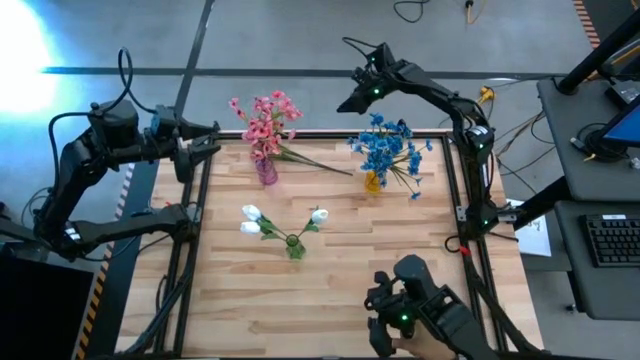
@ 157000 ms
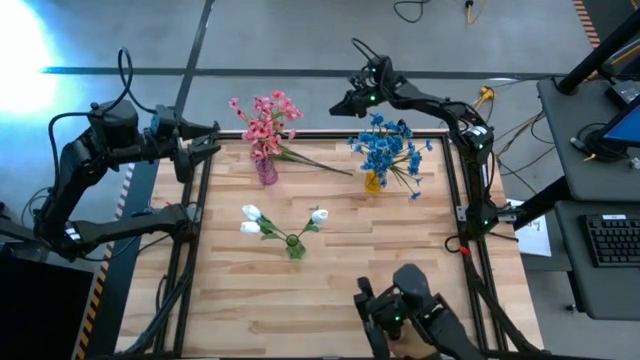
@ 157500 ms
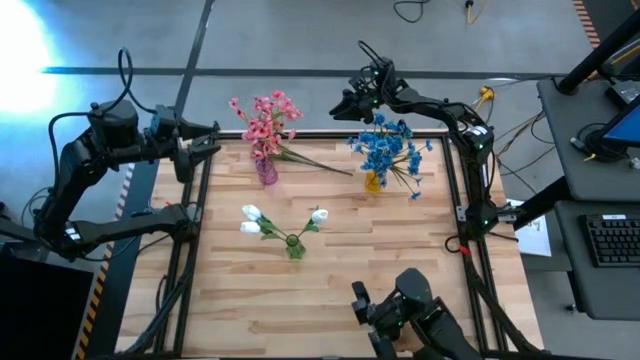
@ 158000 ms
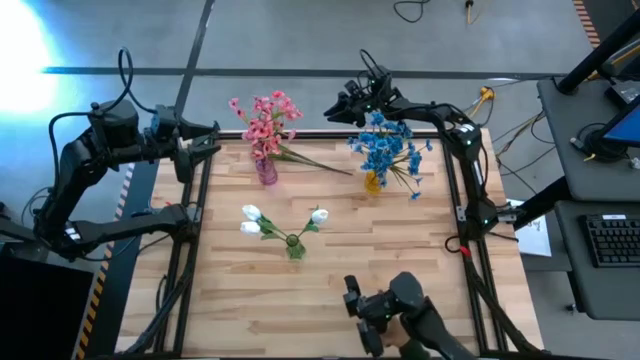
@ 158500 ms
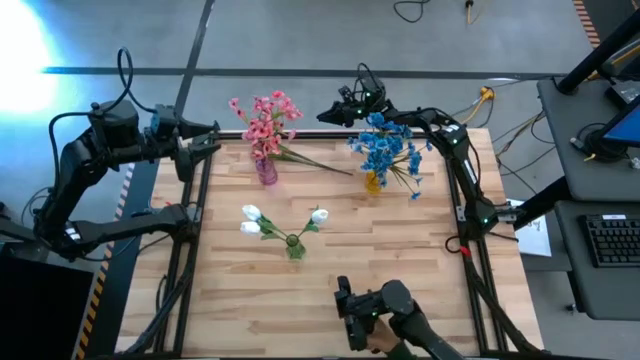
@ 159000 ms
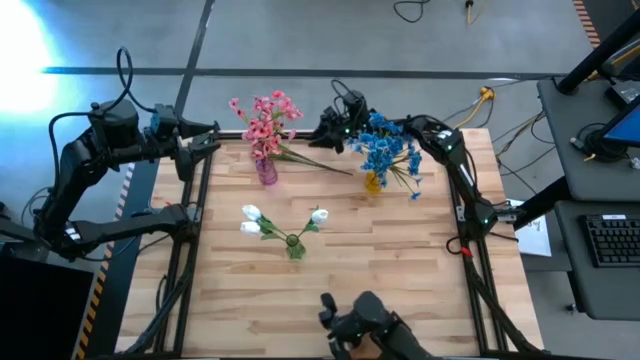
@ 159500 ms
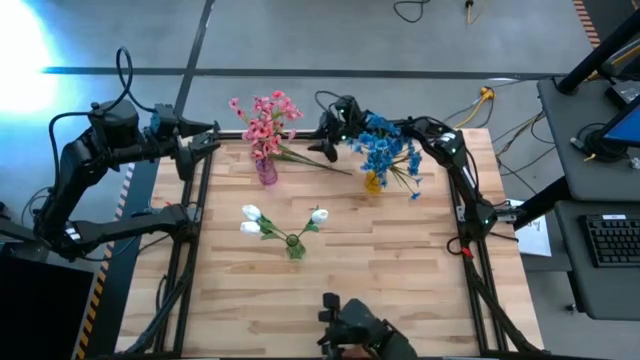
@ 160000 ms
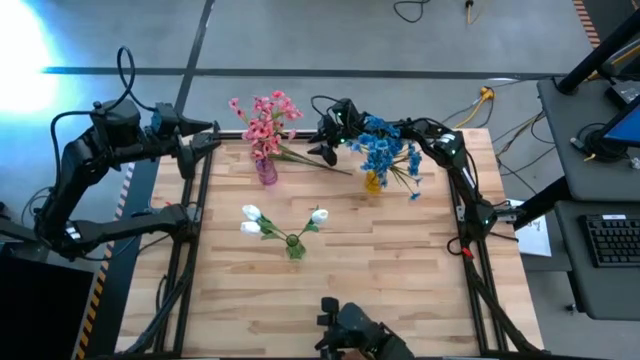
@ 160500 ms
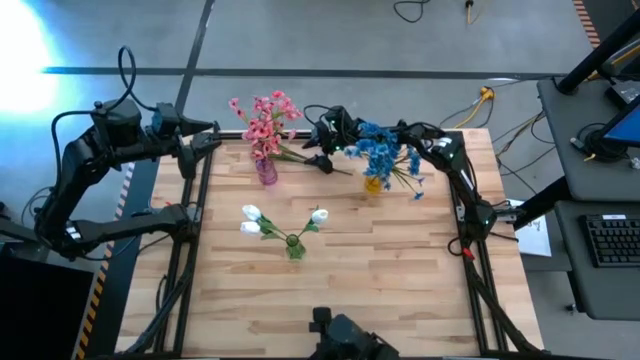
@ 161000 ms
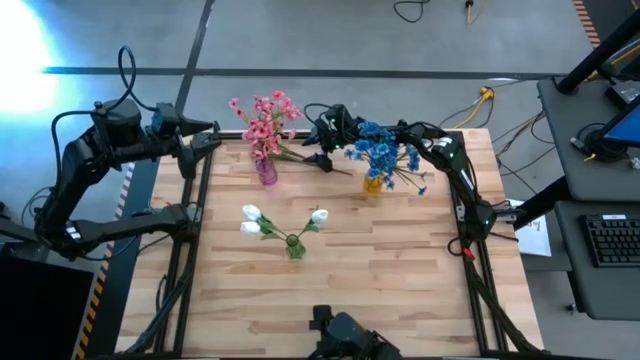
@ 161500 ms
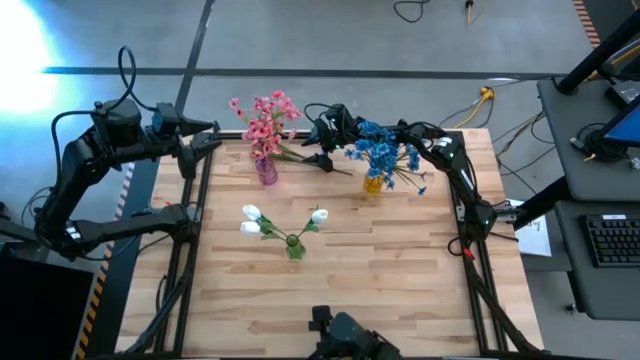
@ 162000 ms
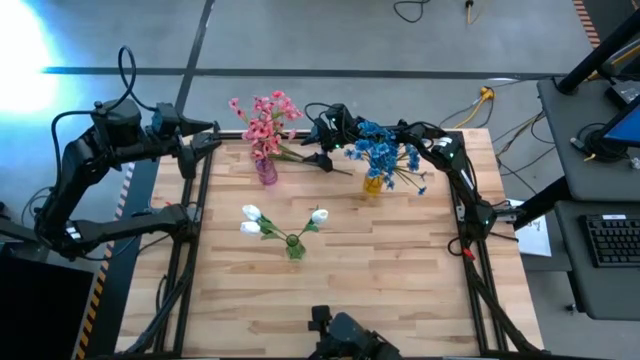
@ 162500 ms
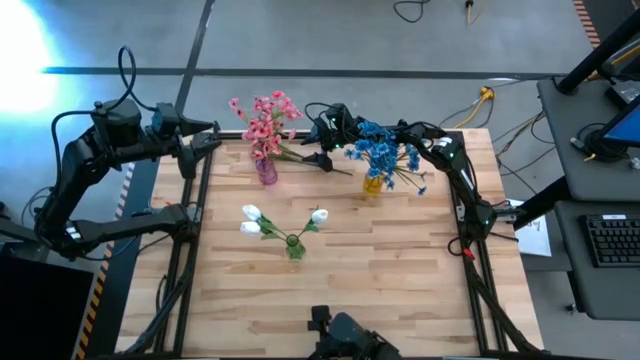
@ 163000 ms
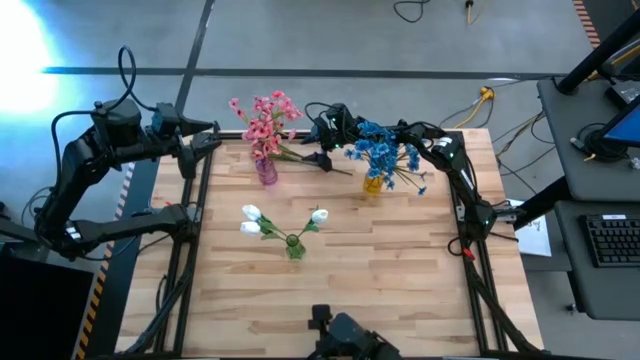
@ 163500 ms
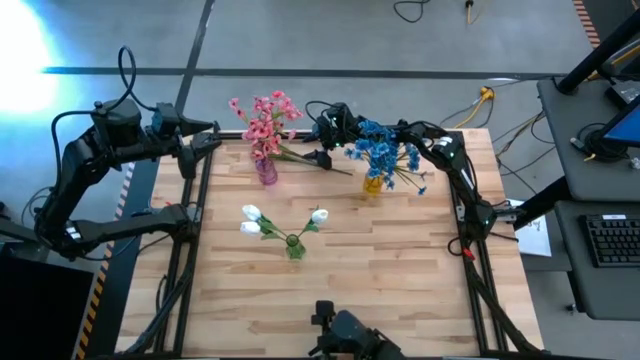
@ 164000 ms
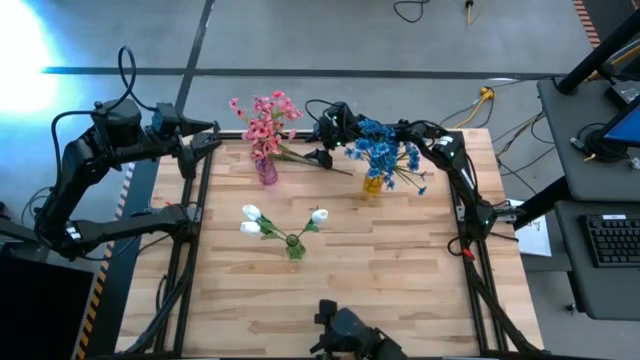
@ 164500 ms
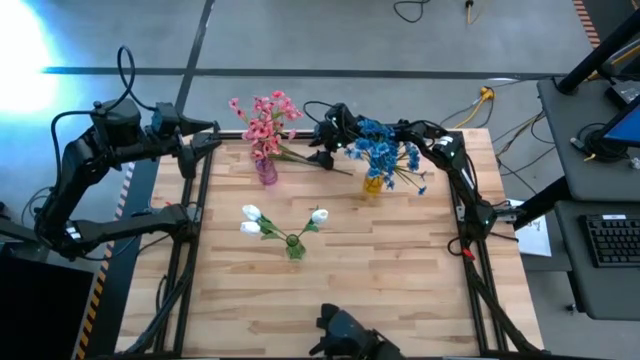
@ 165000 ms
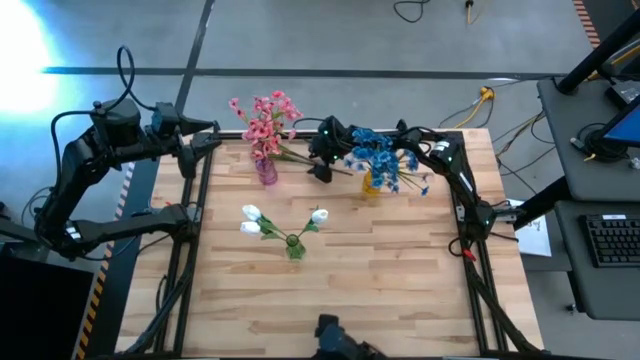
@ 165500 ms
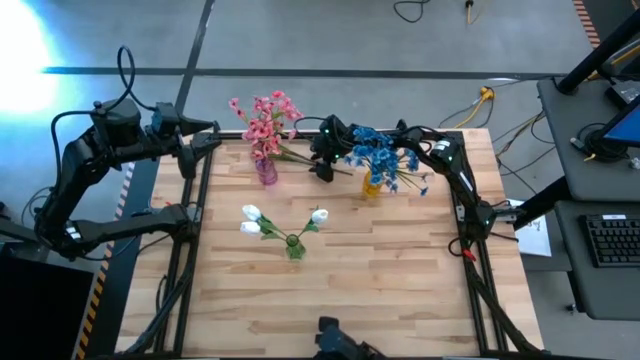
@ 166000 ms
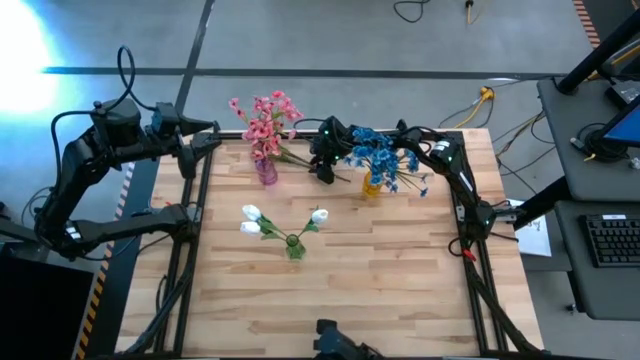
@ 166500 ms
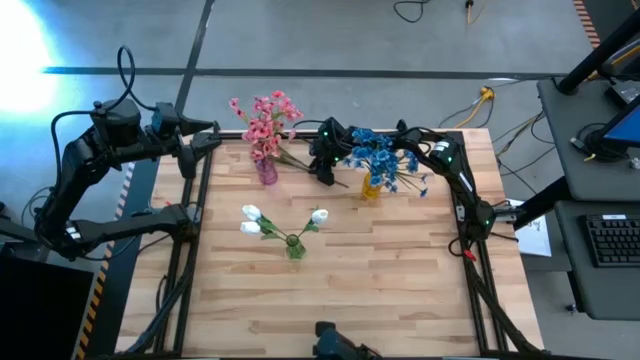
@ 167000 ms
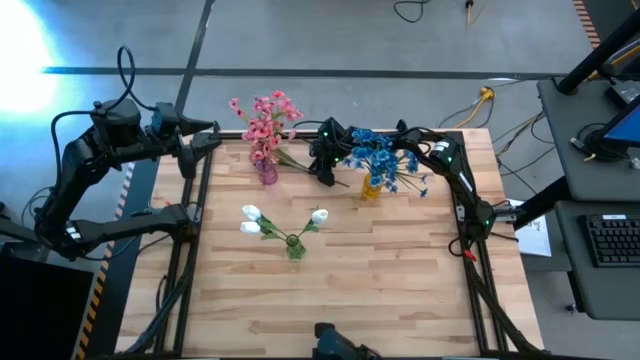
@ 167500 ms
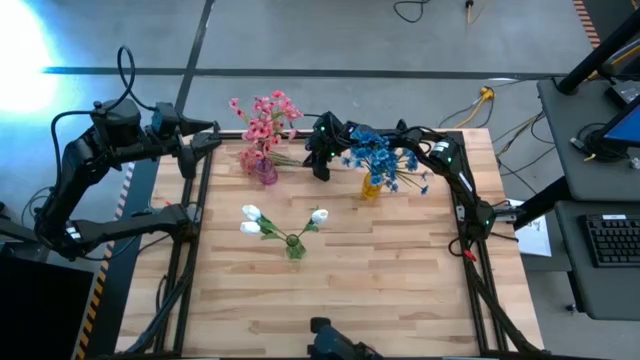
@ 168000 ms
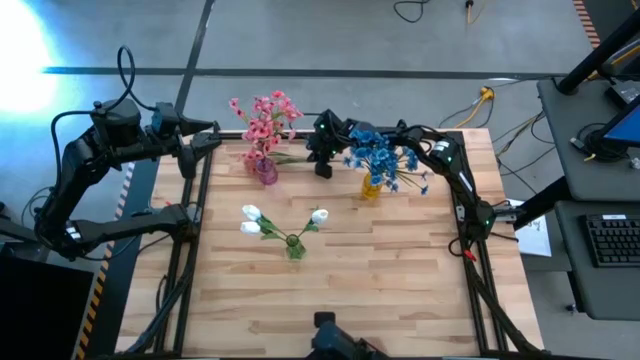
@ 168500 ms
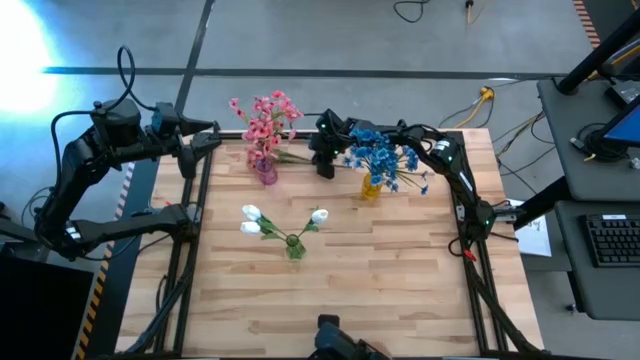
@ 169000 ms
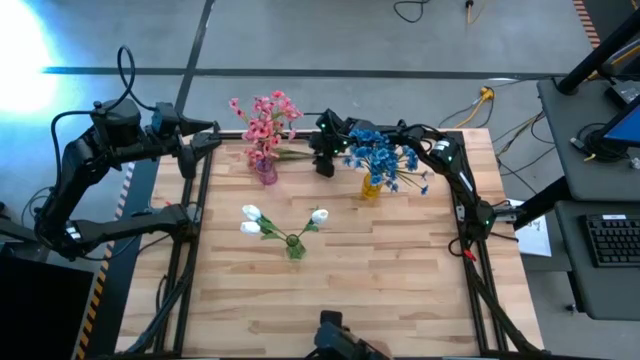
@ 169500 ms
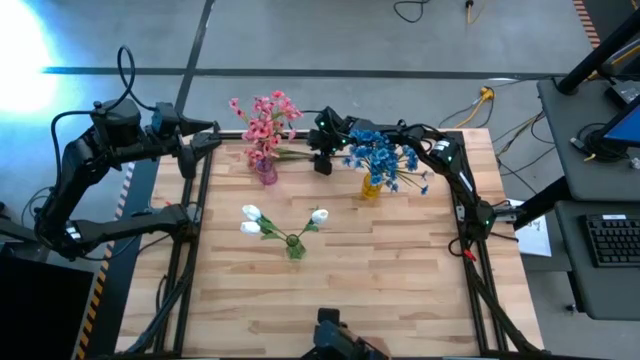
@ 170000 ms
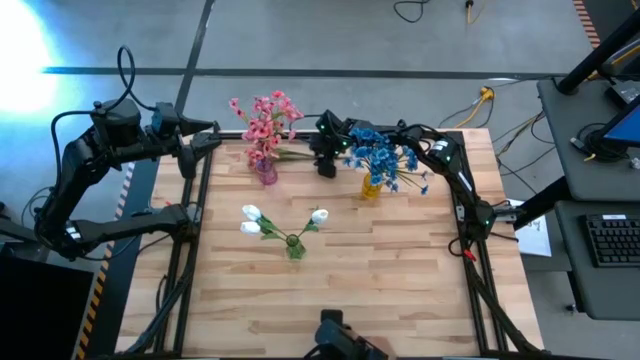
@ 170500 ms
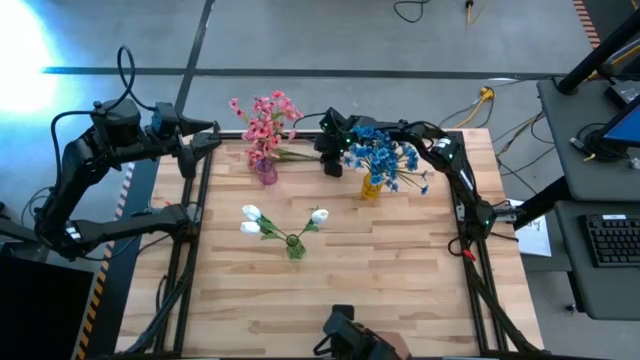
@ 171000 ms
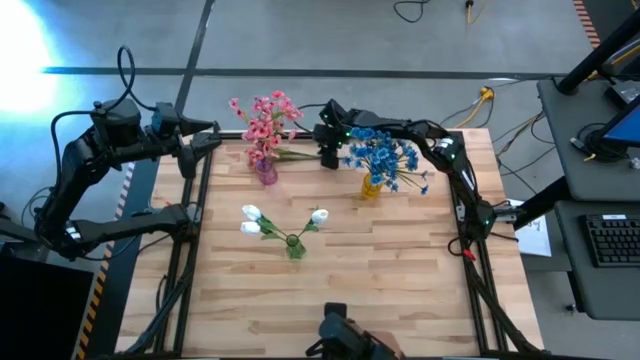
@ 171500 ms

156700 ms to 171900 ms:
Task: Sort flowers into vase by color
Put the pink flowers into the pink vase

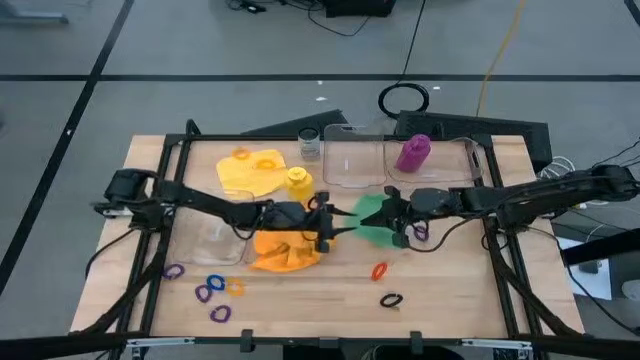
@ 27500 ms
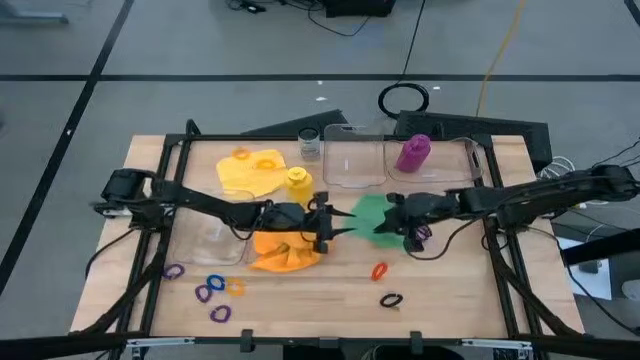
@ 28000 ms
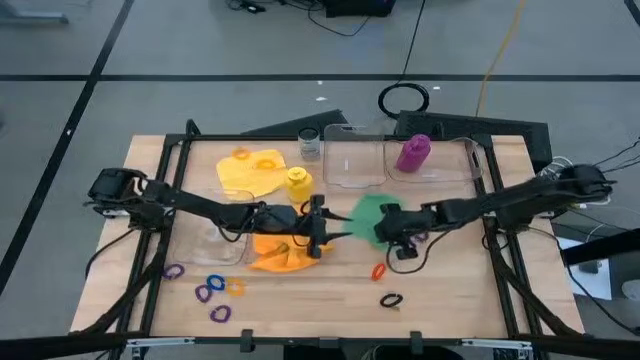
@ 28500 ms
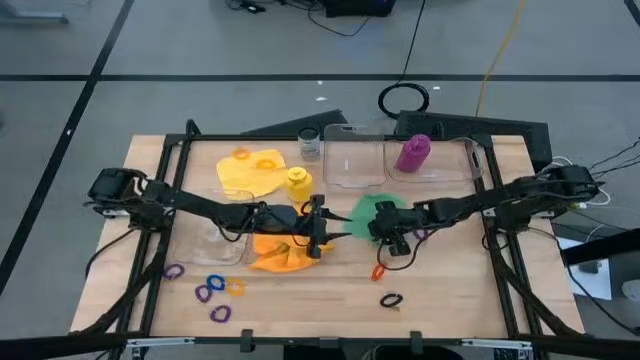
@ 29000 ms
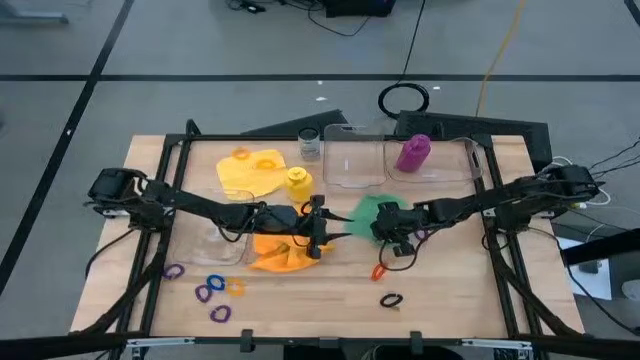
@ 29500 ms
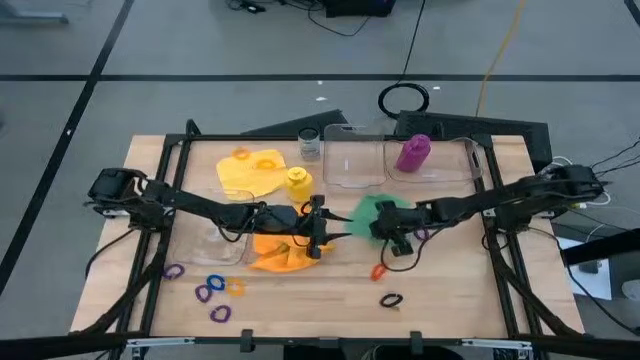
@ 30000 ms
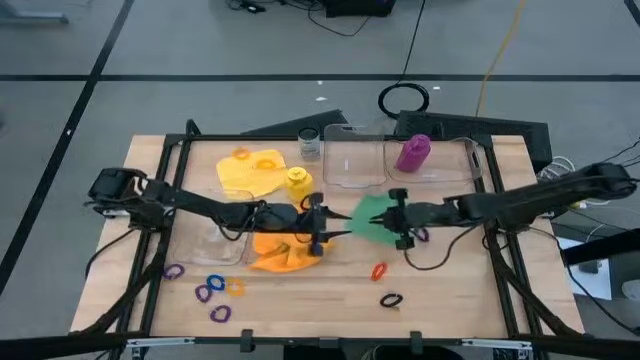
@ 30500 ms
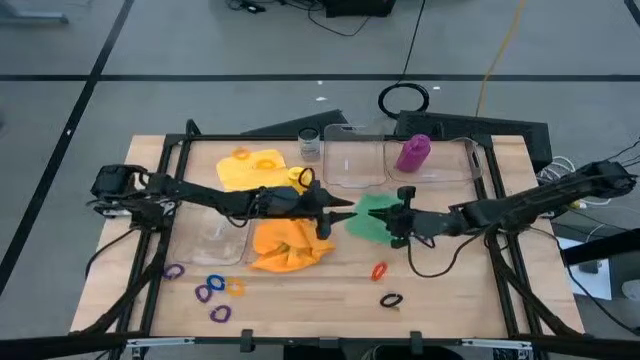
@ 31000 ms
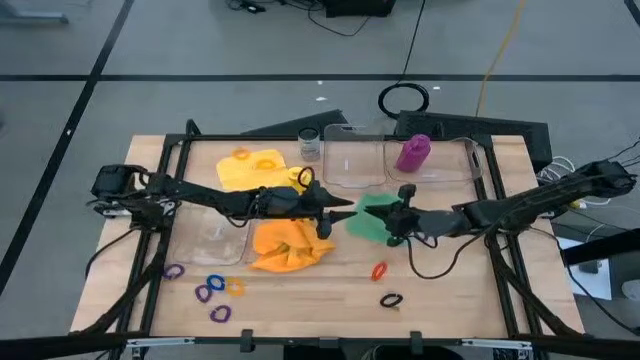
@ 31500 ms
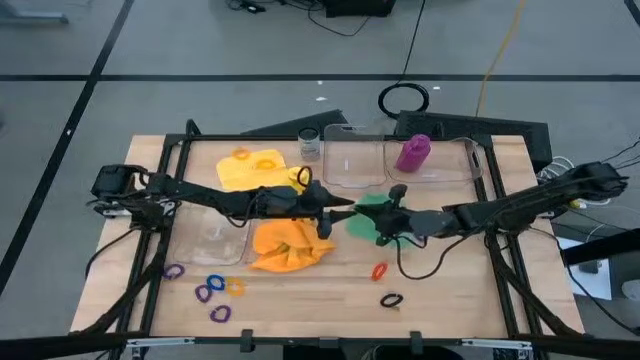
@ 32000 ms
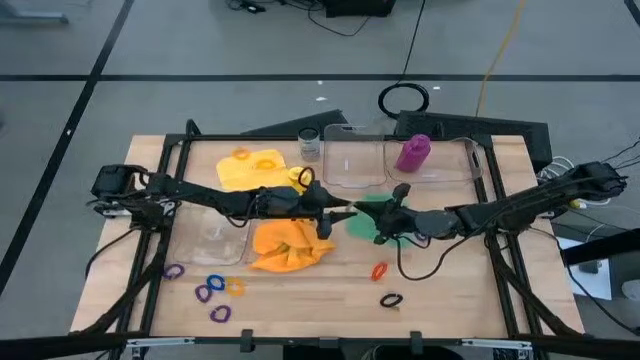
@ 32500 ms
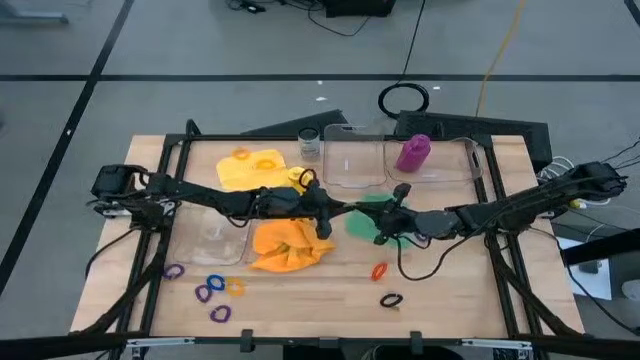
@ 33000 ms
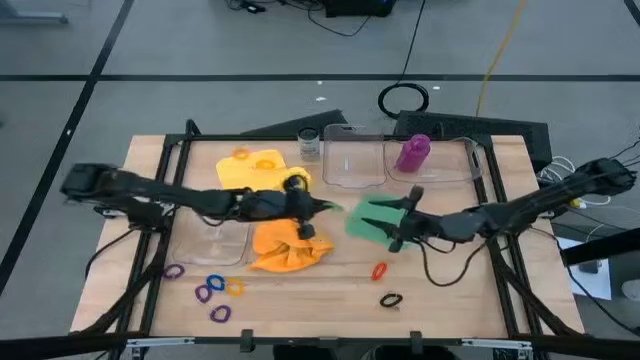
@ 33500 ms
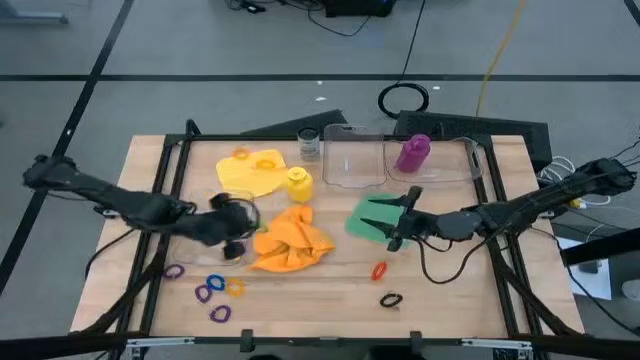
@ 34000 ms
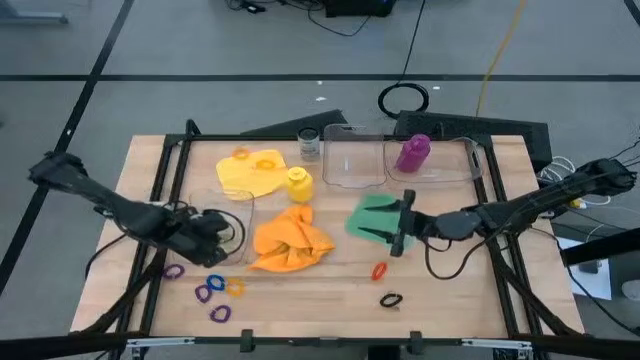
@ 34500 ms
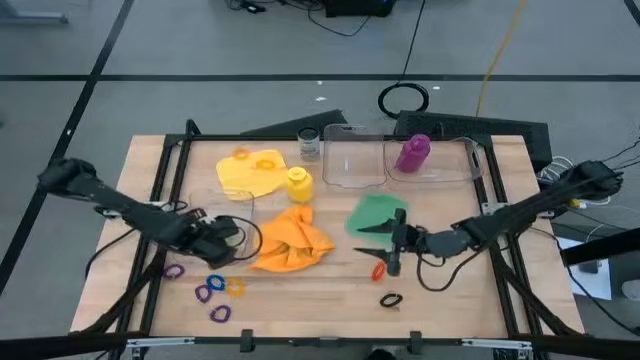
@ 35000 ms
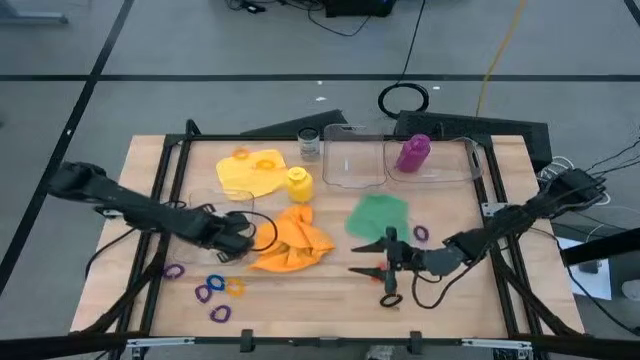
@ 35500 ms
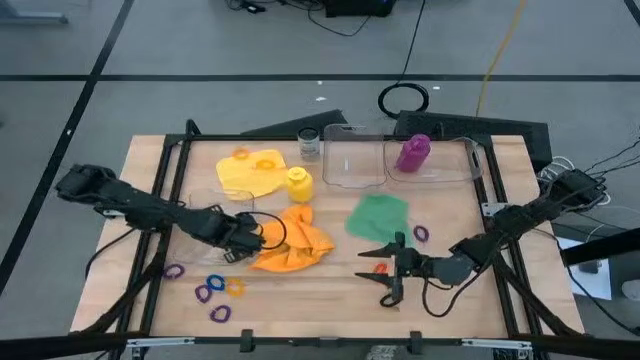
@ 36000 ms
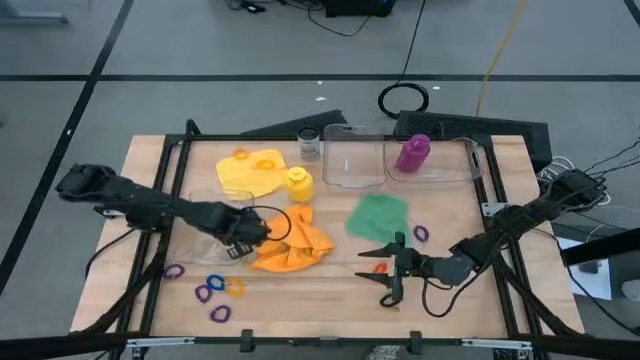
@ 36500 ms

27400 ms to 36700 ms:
Task: Pick & Place Sports Items
Put the green spring keychain into the bottom transparent bin
